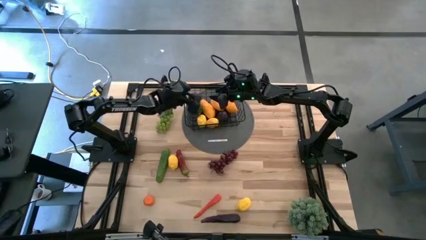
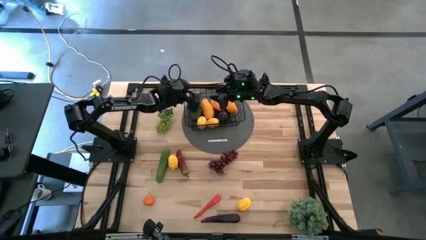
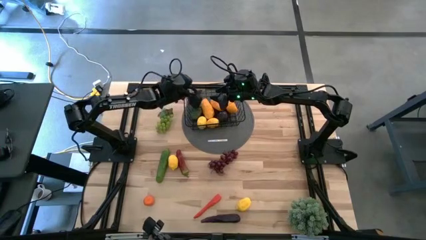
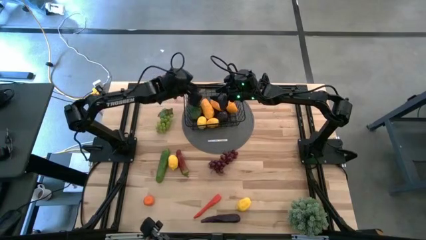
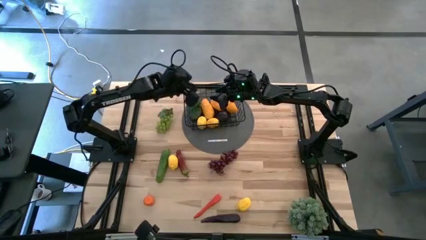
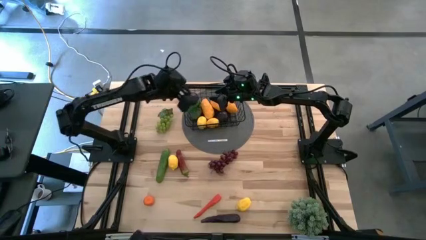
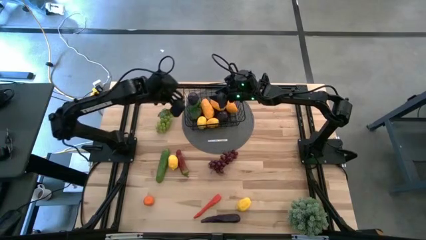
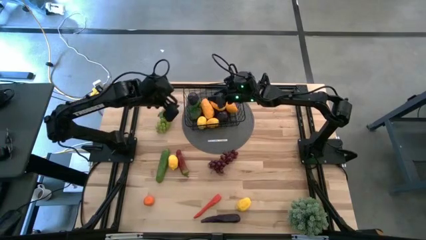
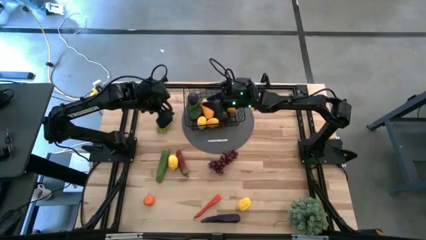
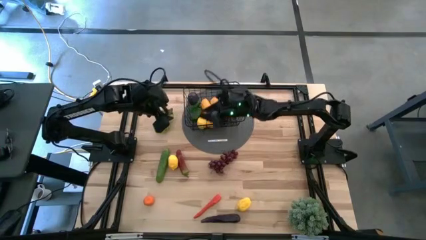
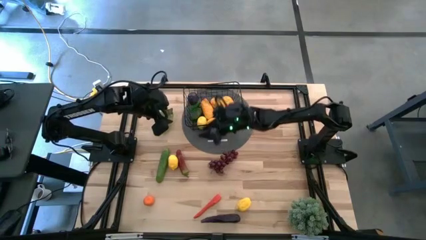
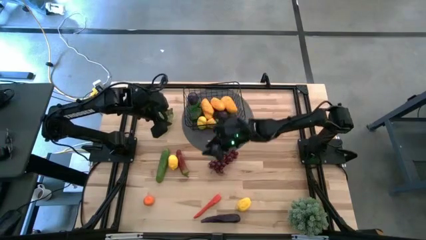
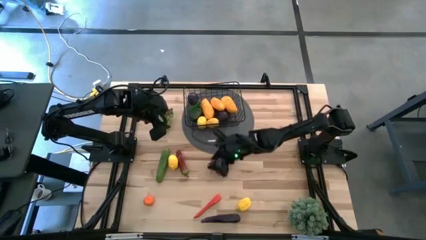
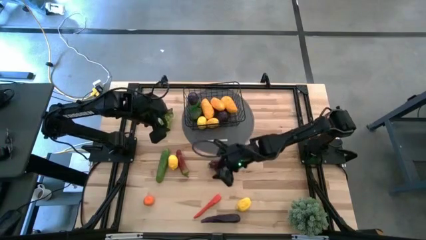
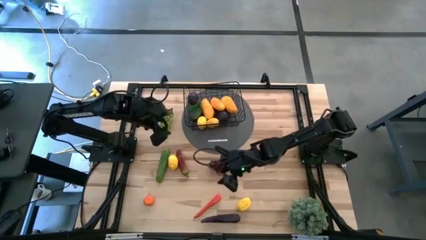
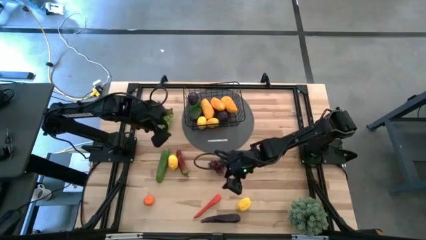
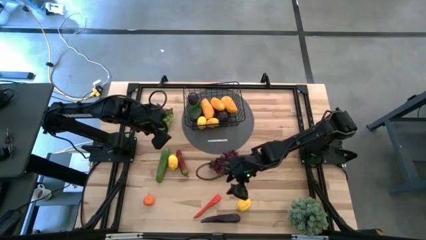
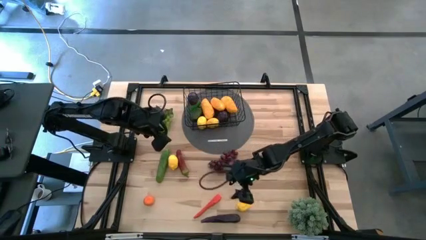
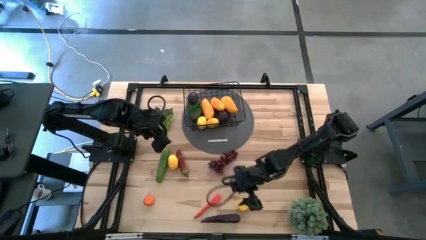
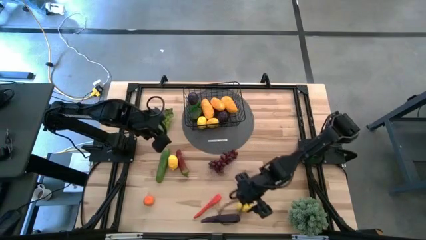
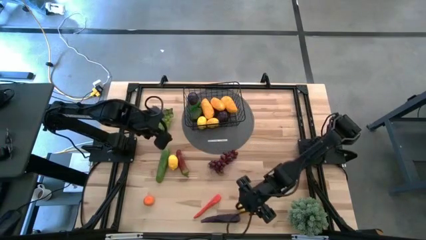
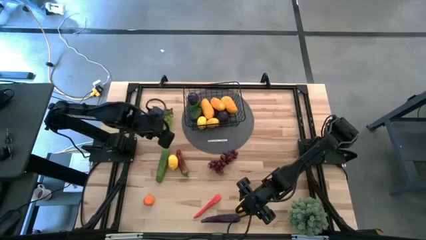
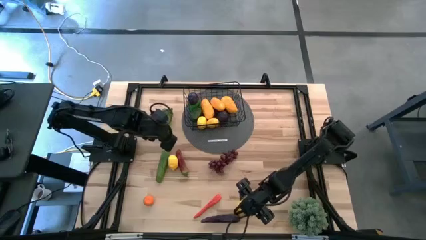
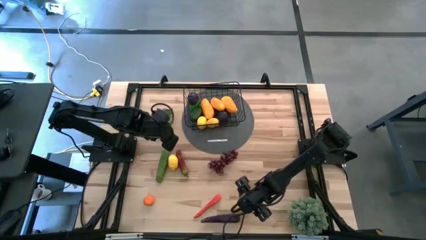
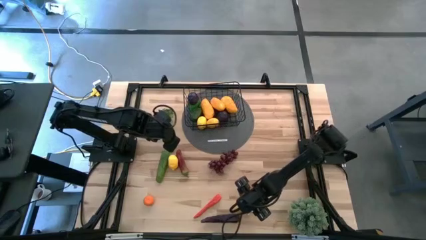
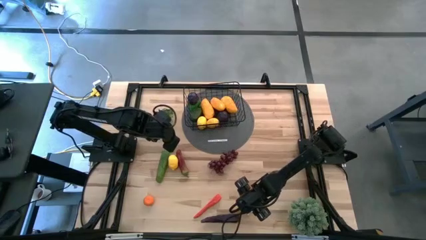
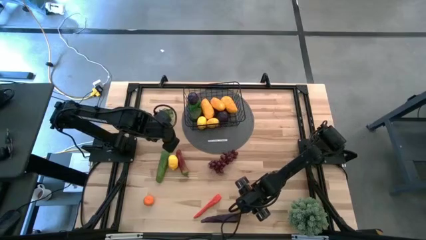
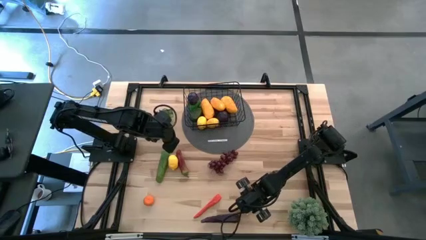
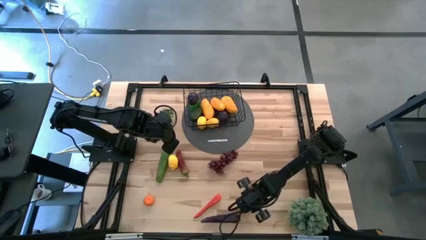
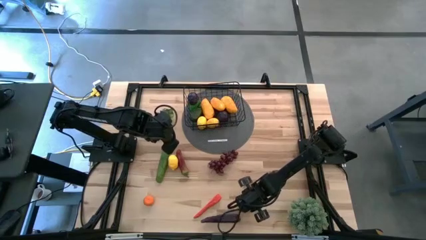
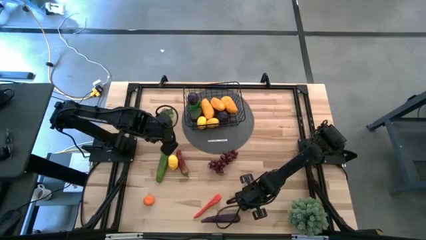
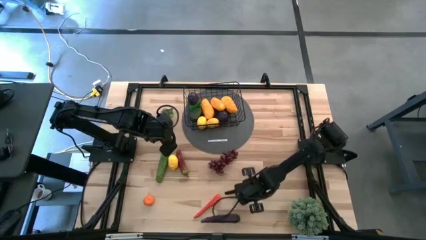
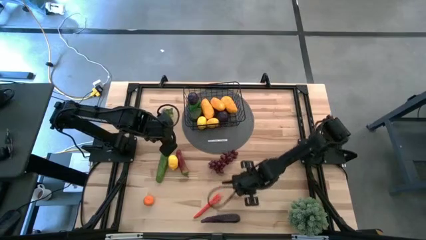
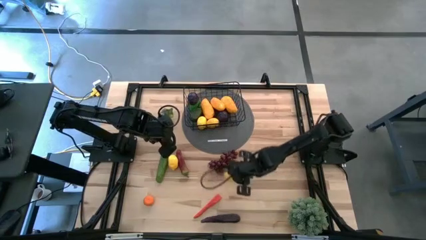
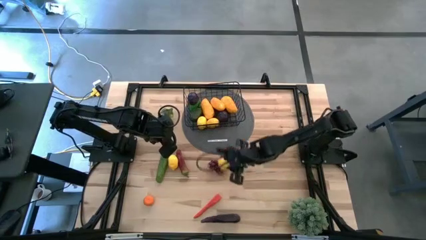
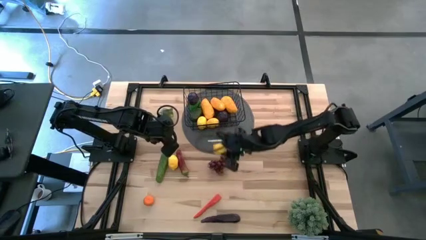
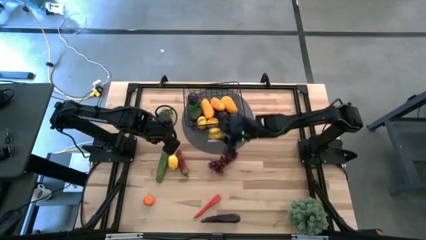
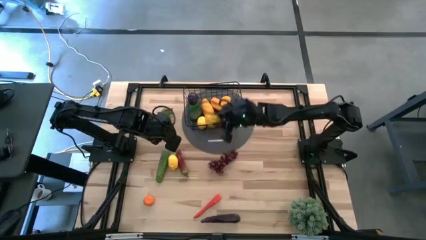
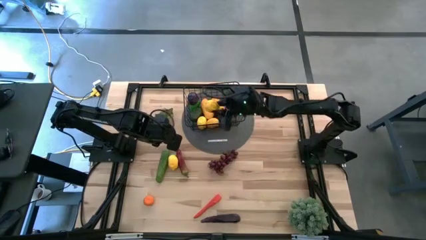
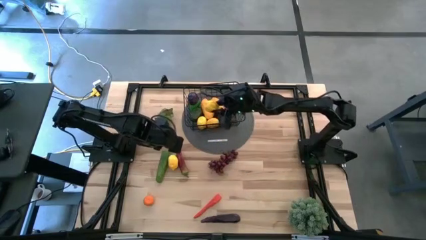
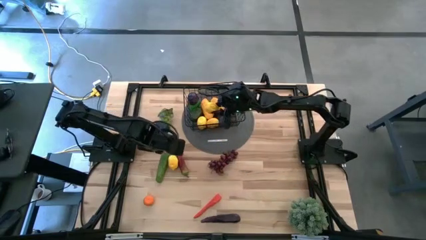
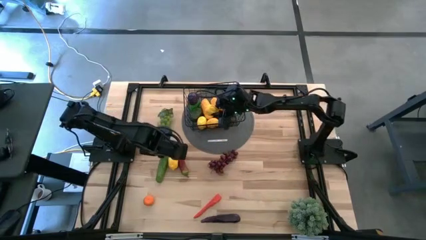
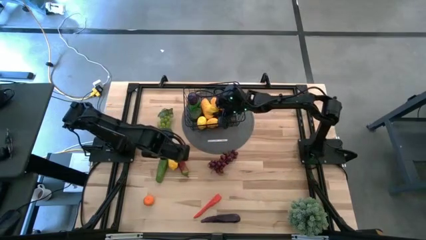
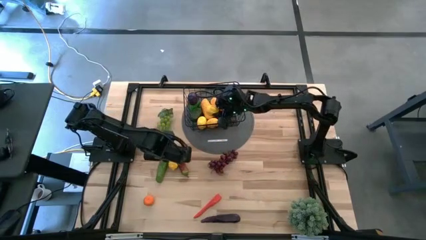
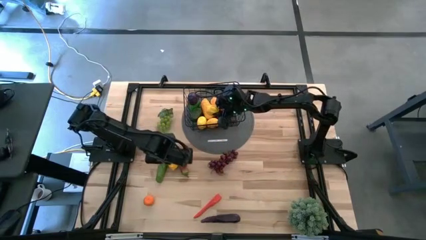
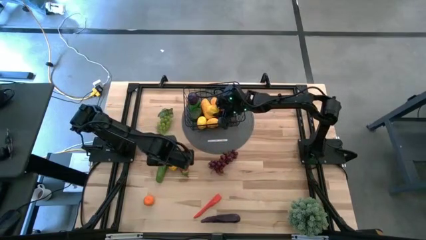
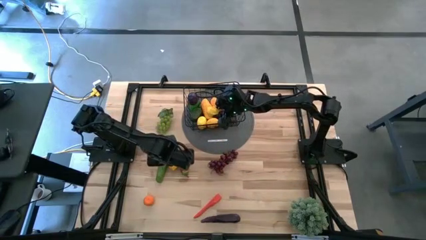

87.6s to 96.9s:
Task: Build produce basket
Put the bottom lemon into the wire basket

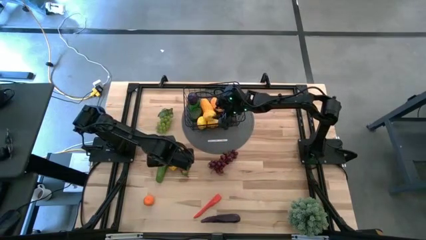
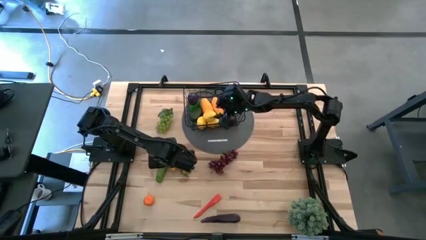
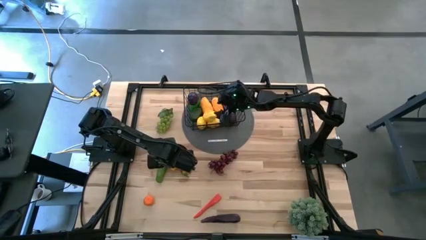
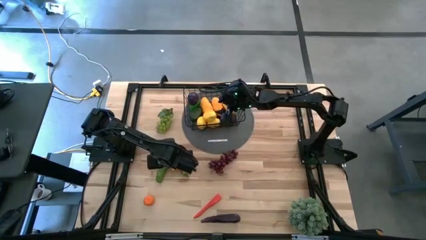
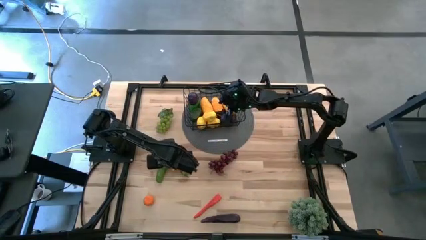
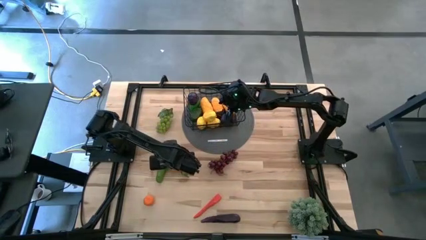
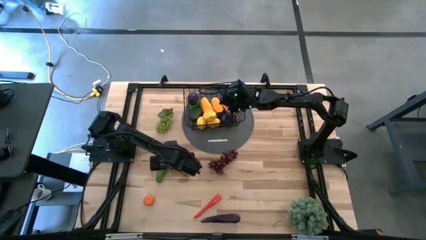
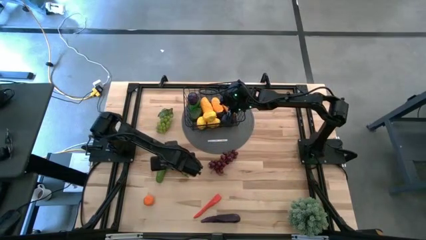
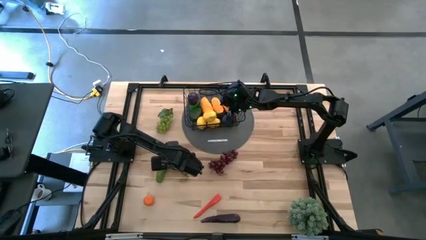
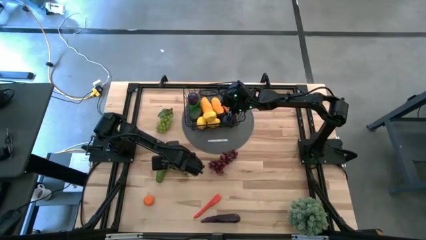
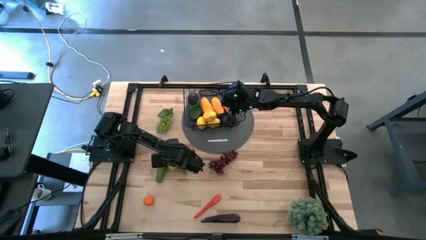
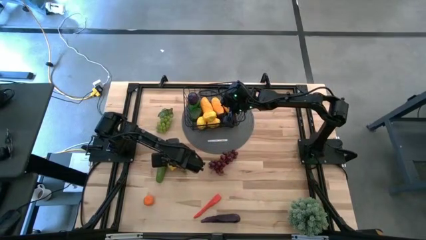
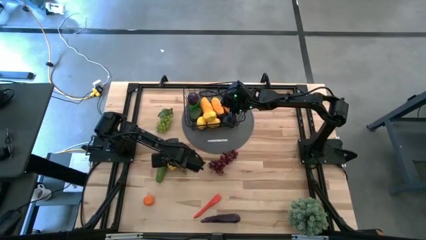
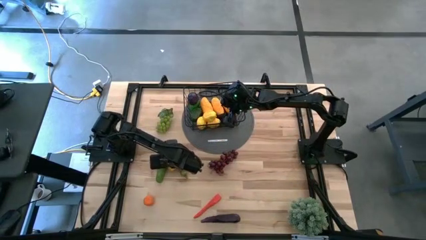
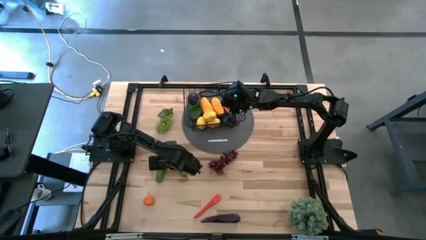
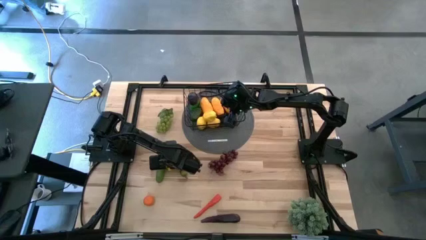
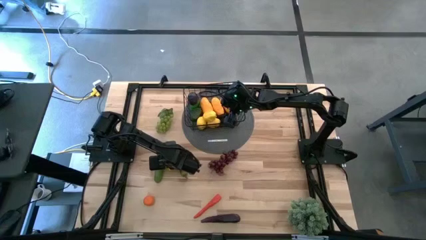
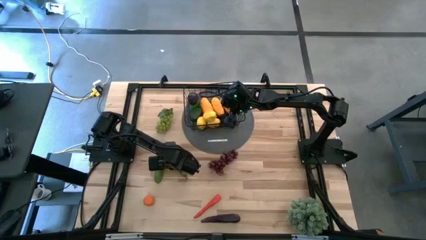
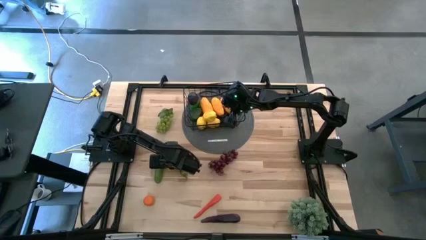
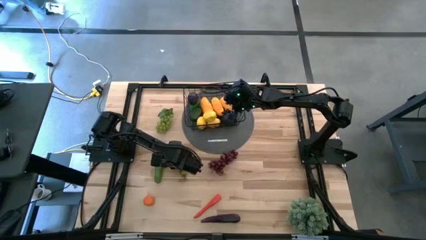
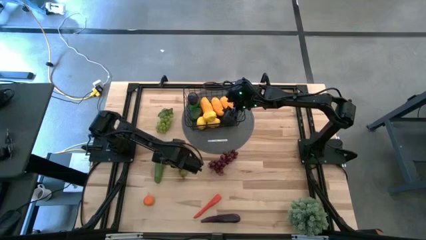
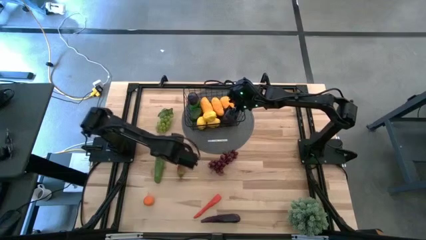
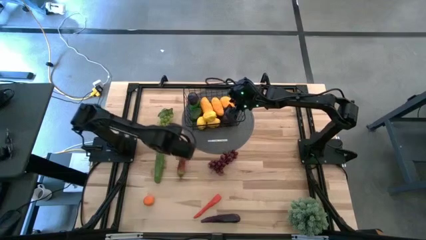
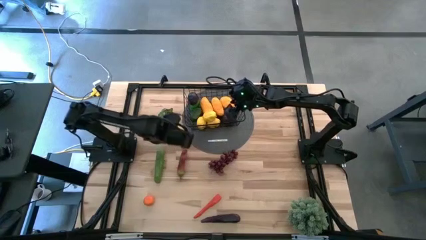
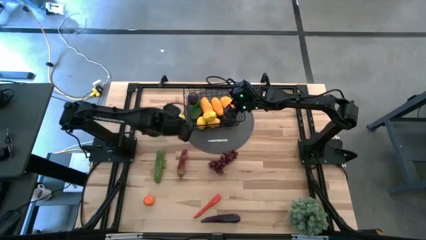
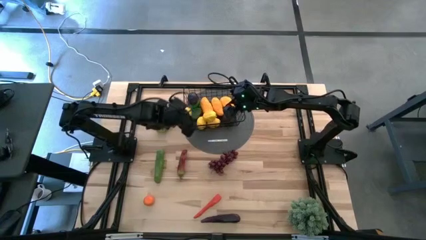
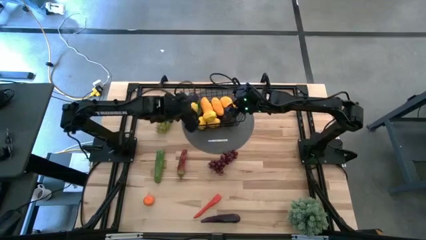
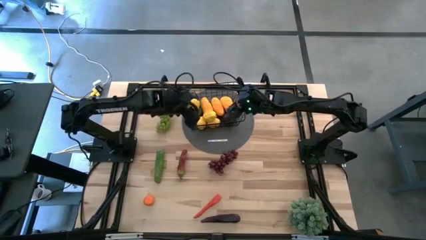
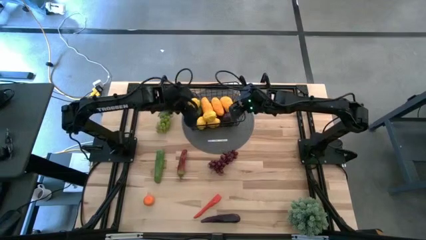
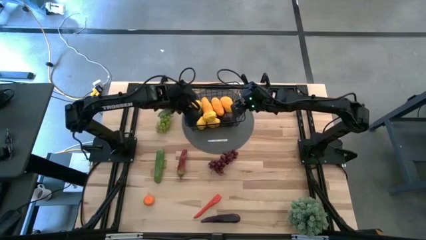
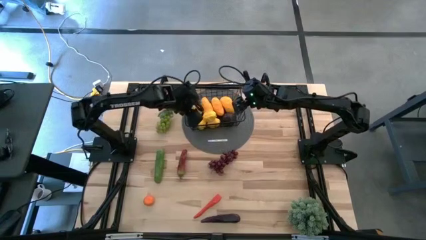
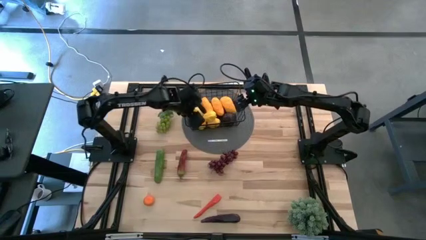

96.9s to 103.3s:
Put the lemon into the wire basket
